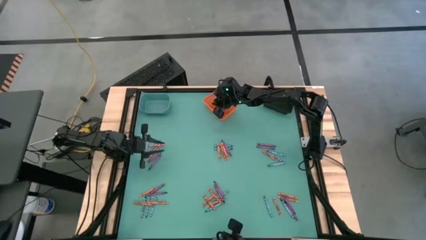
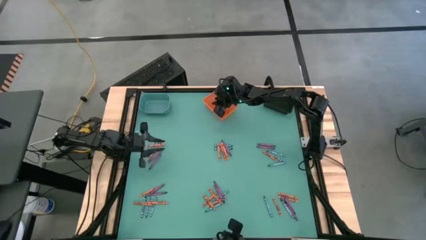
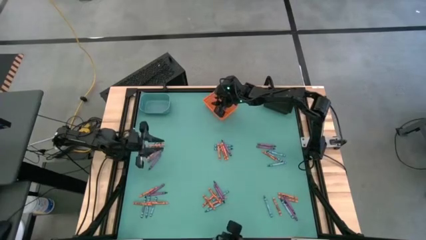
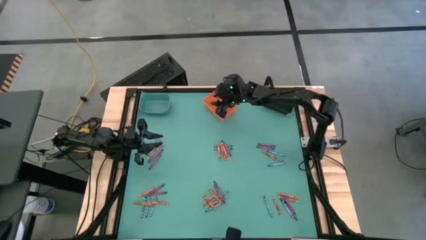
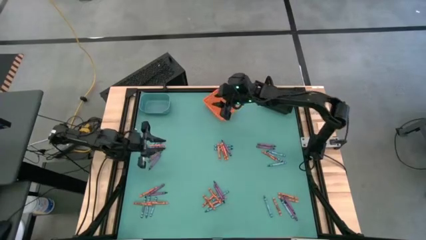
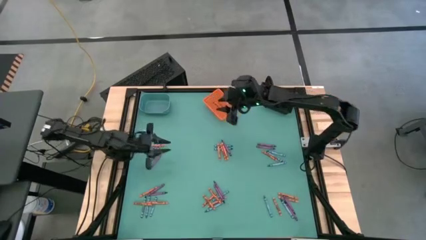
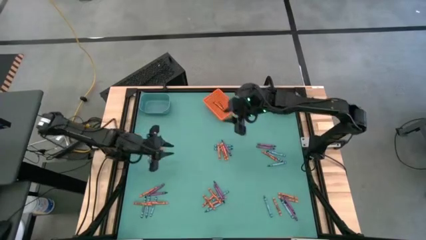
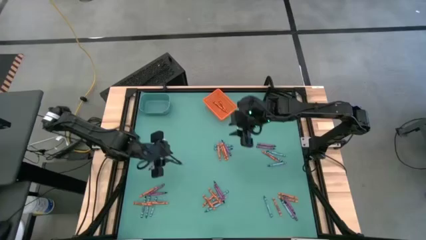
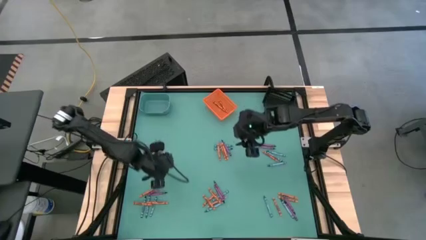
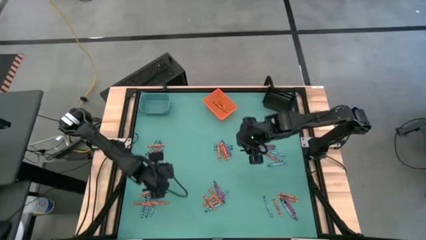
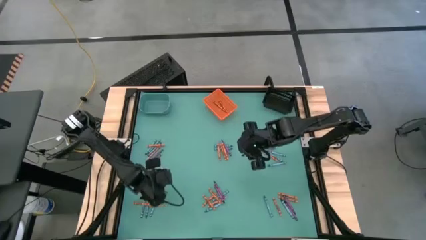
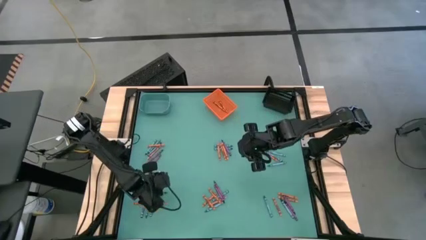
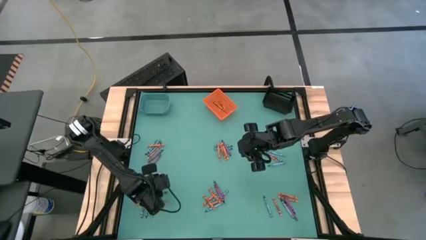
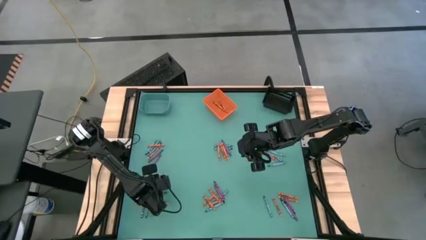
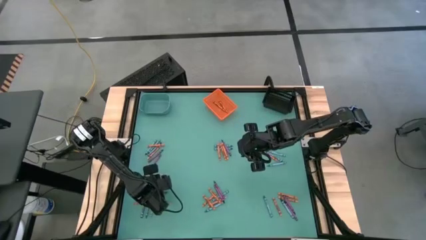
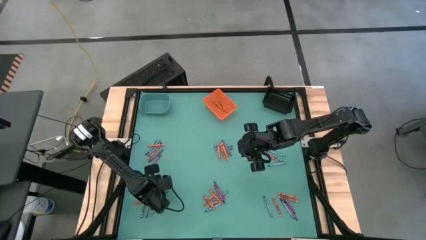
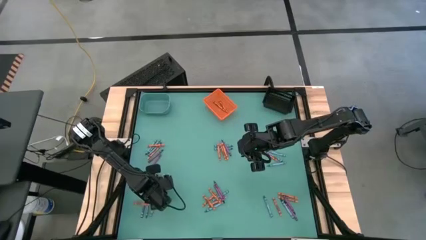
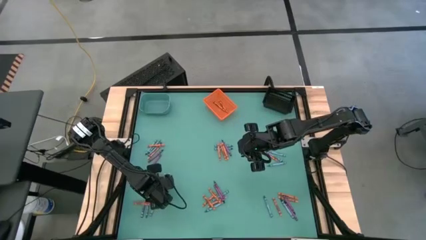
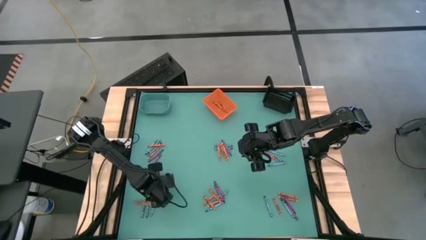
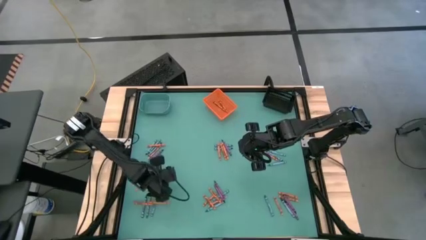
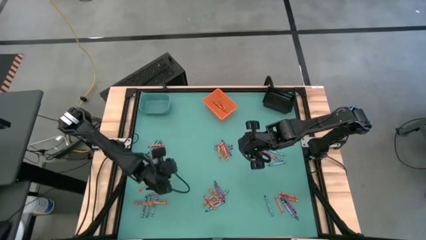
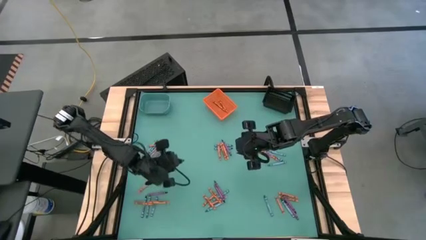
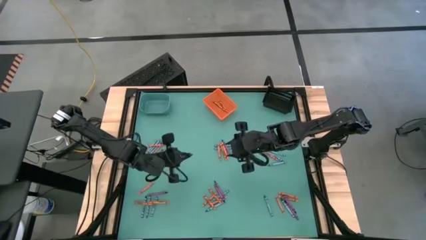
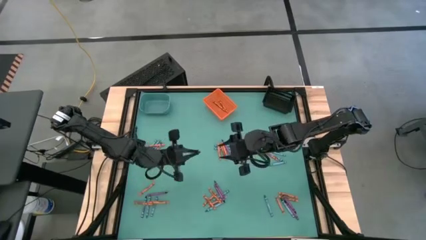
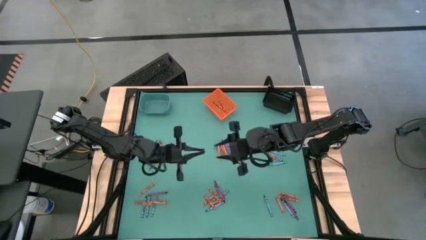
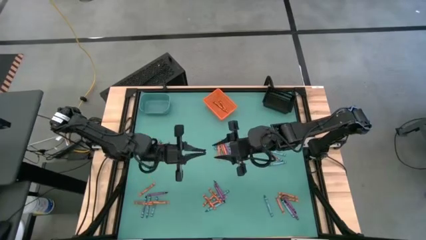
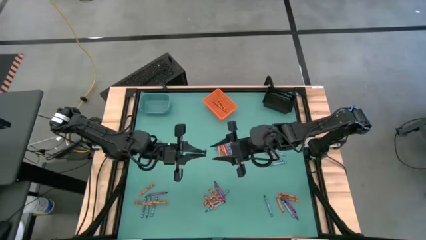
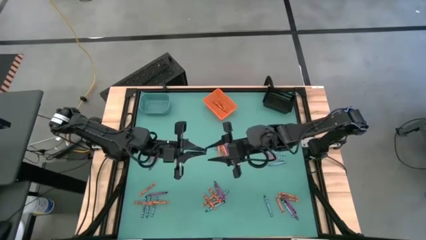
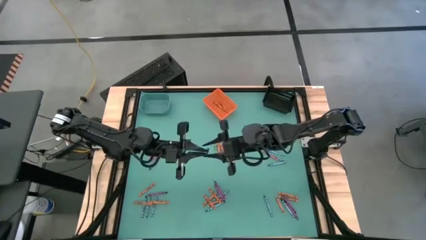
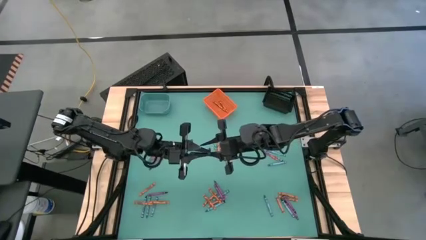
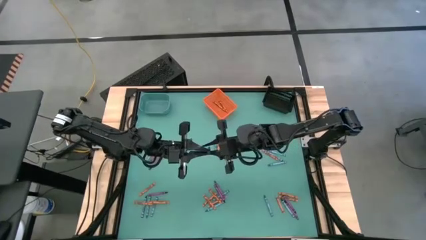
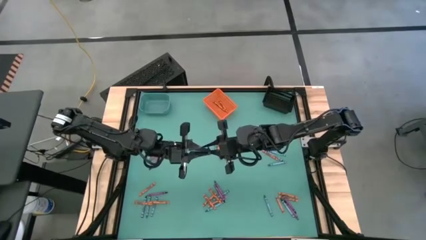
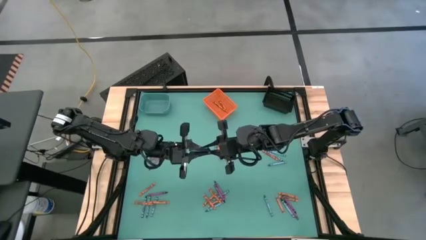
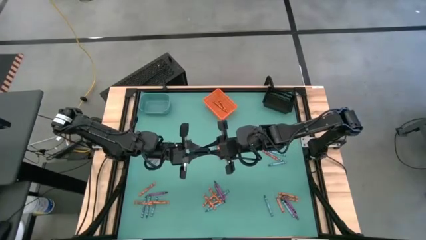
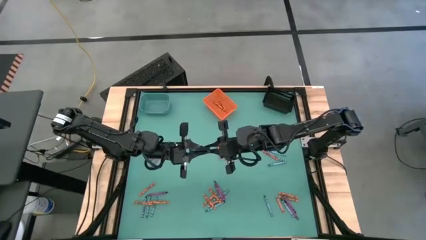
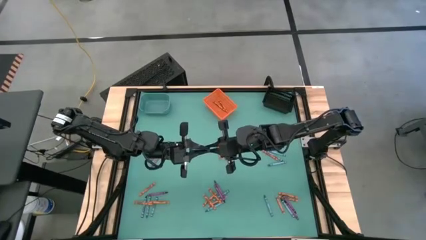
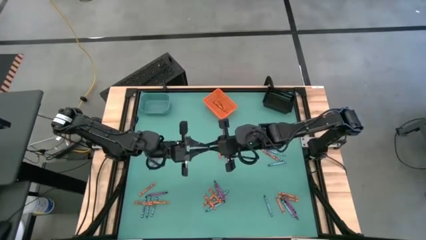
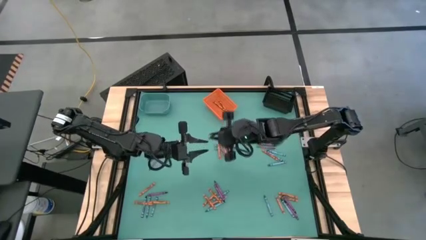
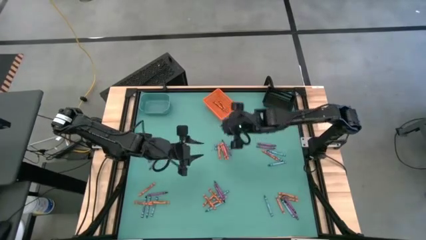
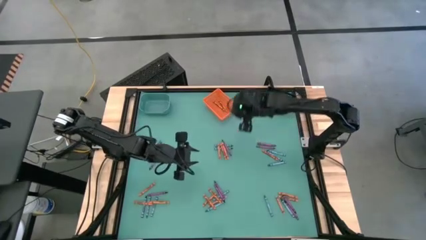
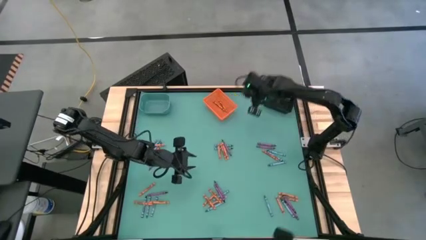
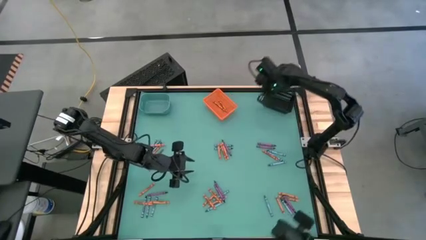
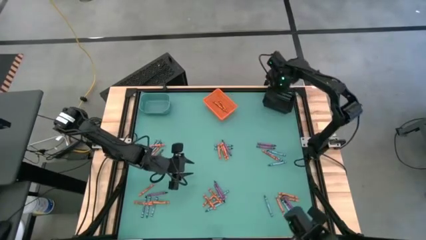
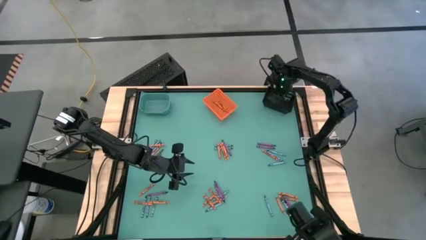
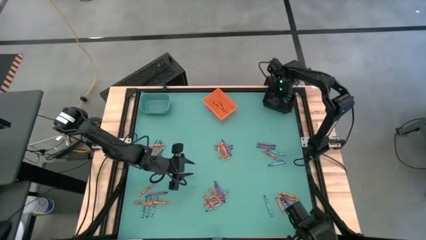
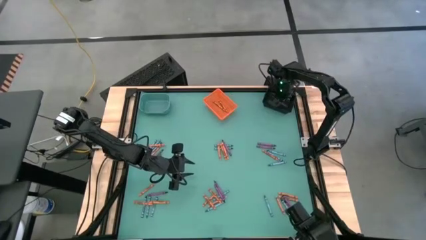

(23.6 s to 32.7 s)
Task: Sort crayons
Put the violet crayon into the black bin

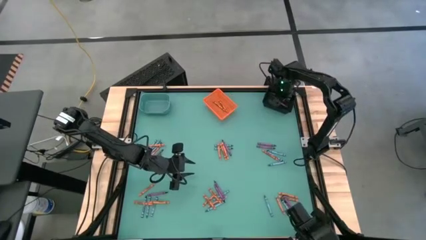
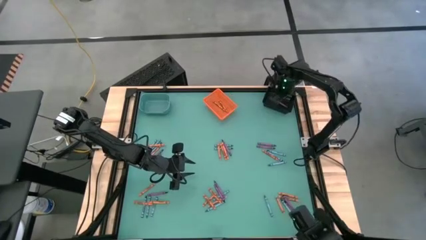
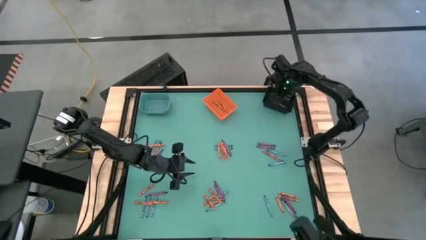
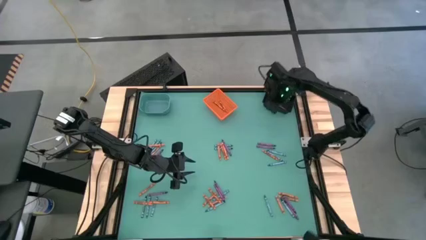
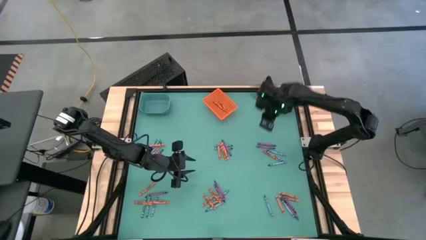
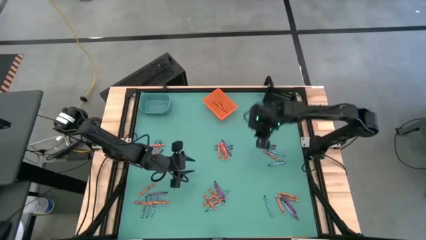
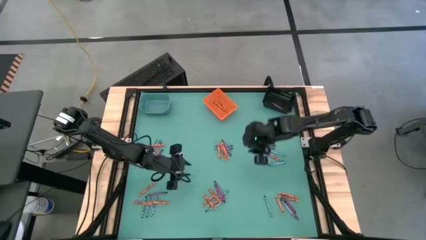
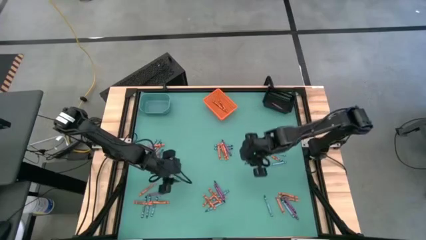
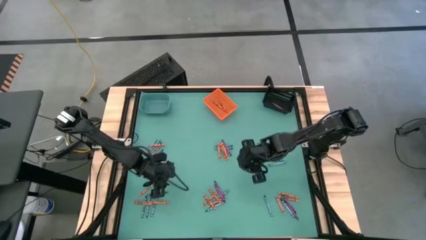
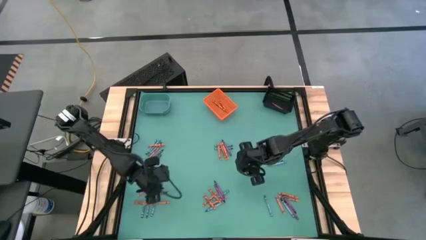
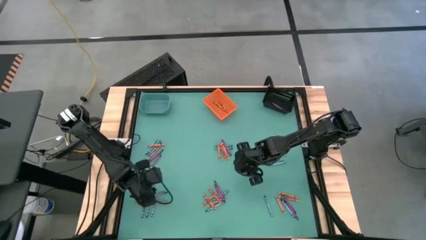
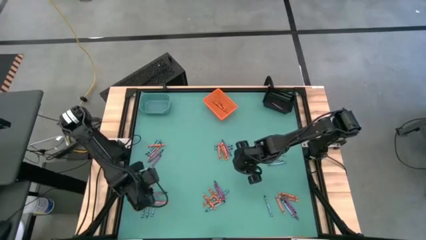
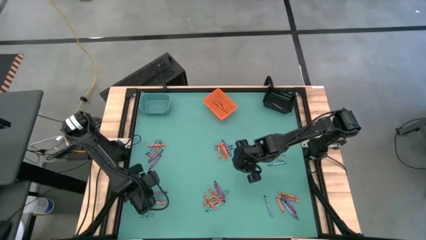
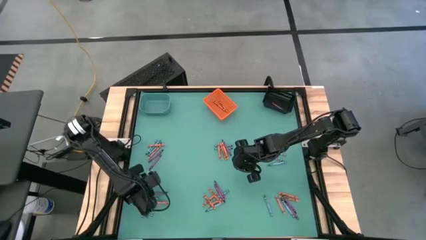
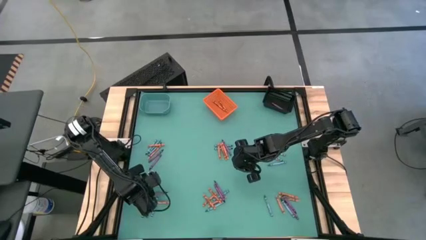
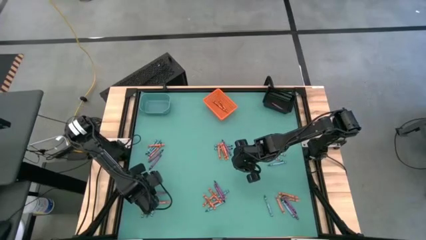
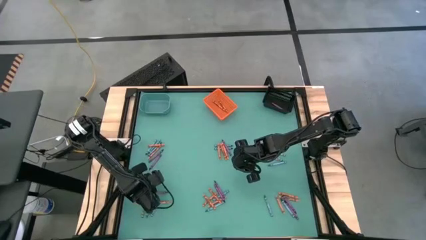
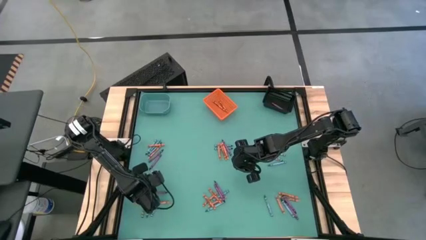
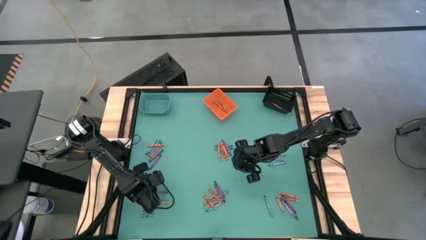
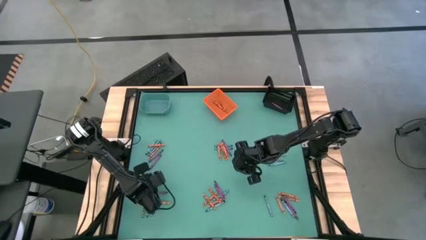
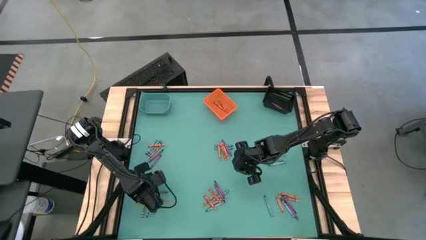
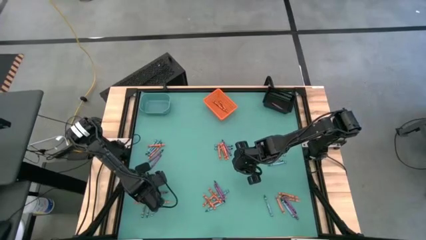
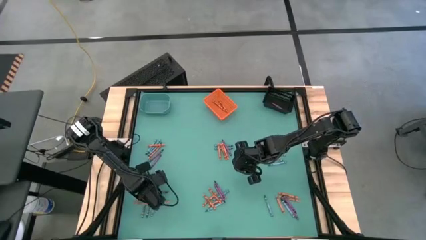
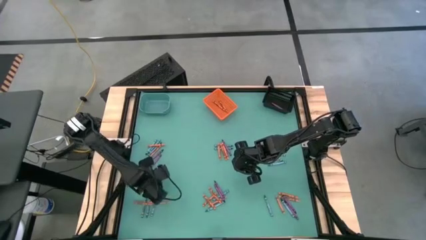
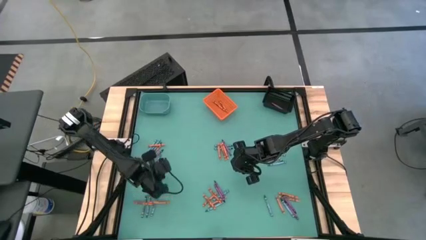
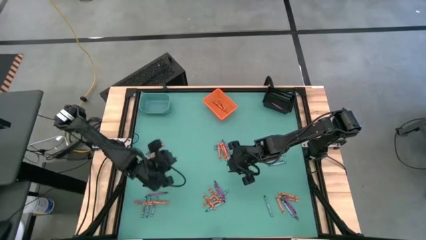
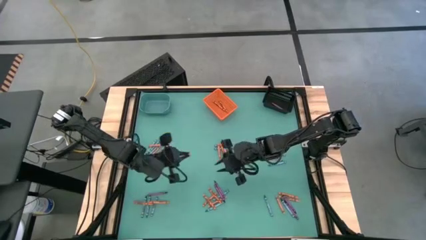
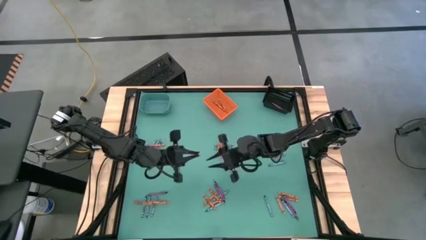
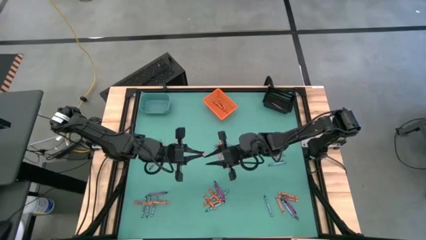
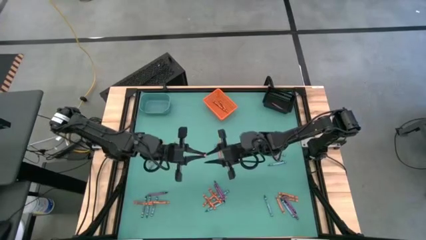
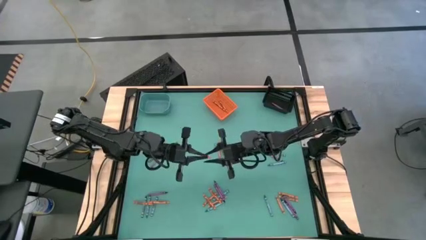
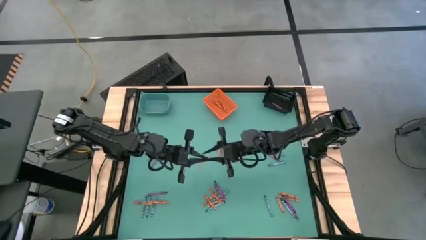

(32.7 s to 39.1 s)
Put the orange crayon into the orange bin
